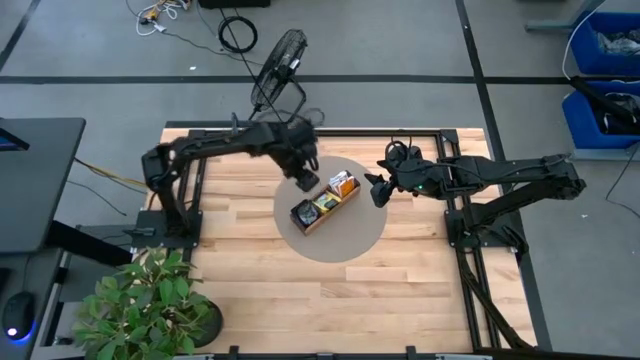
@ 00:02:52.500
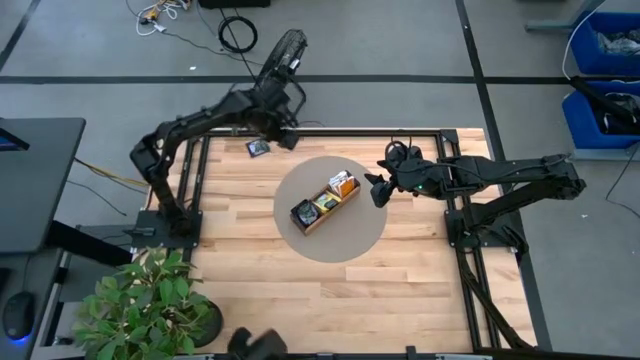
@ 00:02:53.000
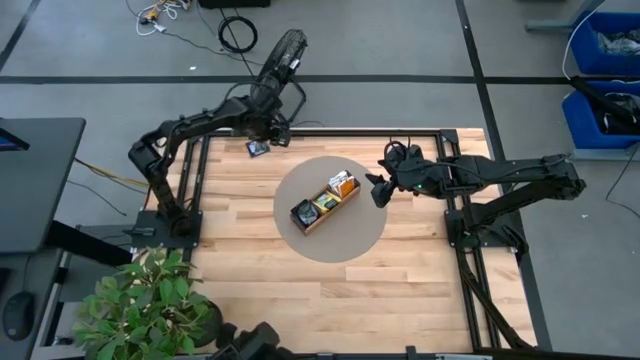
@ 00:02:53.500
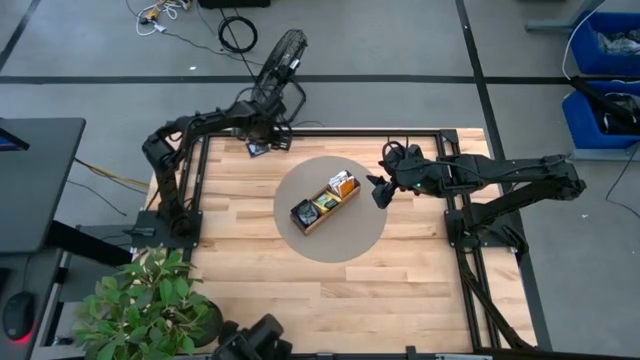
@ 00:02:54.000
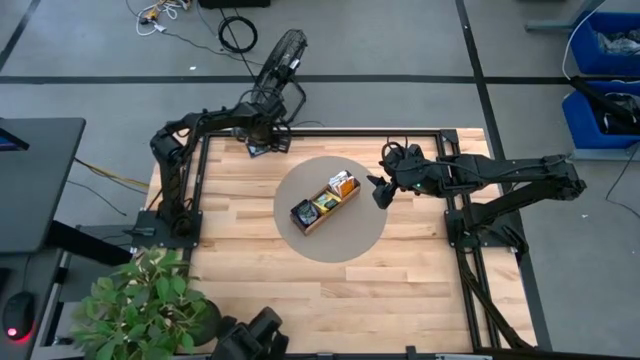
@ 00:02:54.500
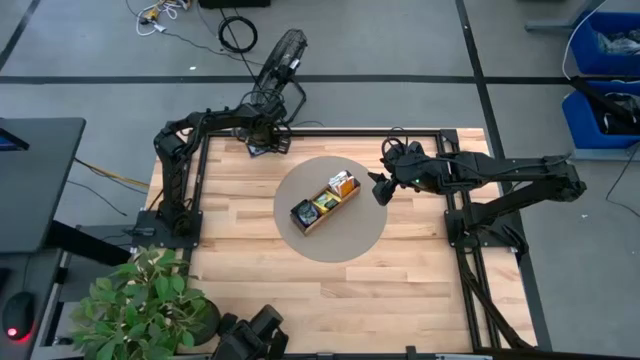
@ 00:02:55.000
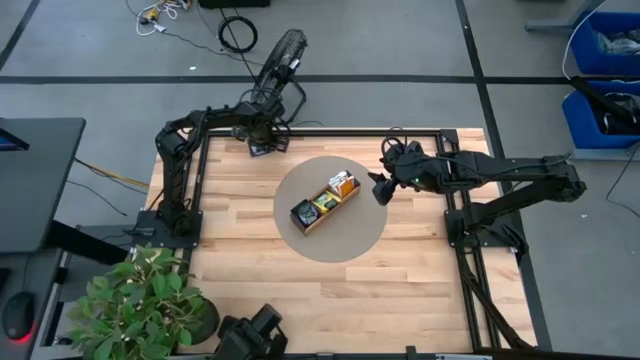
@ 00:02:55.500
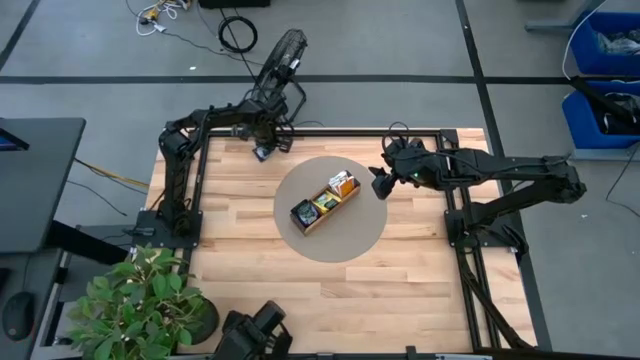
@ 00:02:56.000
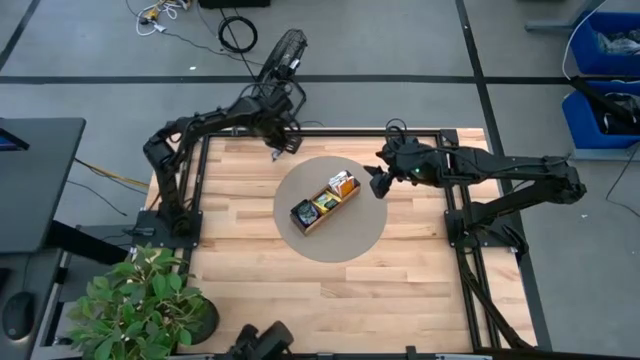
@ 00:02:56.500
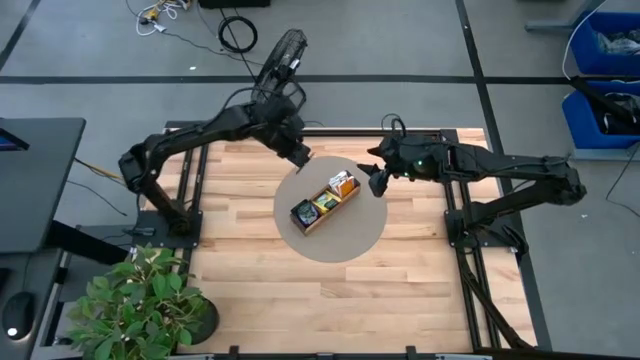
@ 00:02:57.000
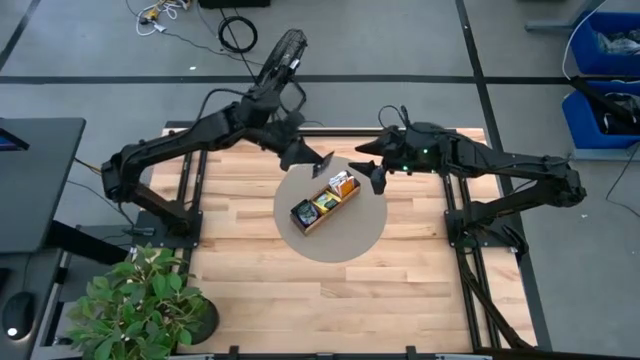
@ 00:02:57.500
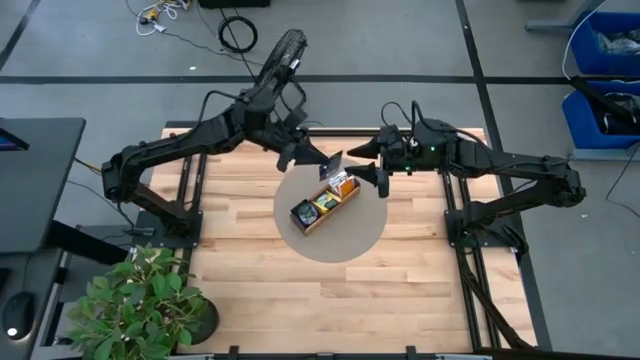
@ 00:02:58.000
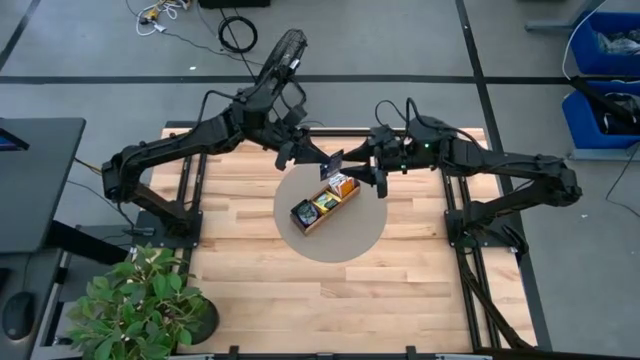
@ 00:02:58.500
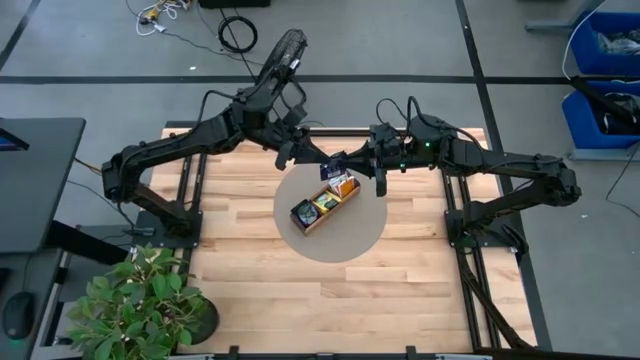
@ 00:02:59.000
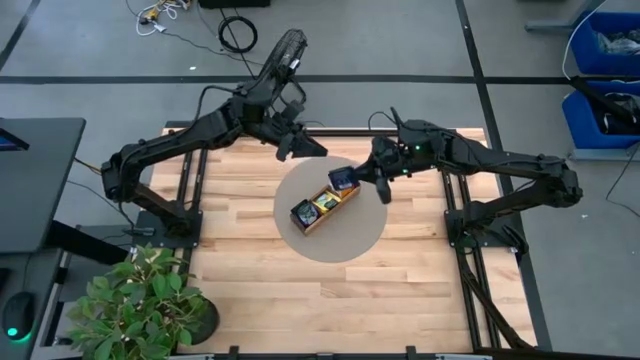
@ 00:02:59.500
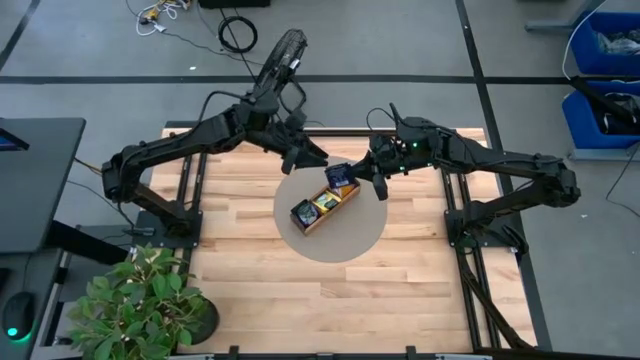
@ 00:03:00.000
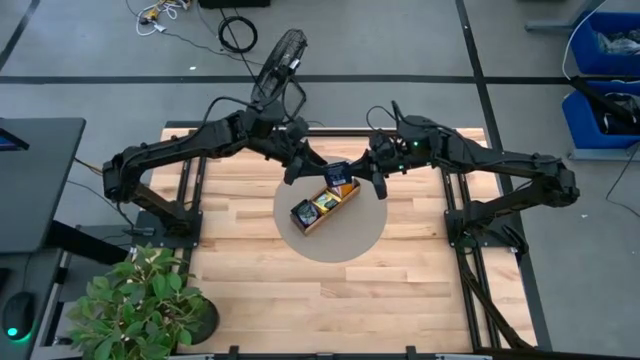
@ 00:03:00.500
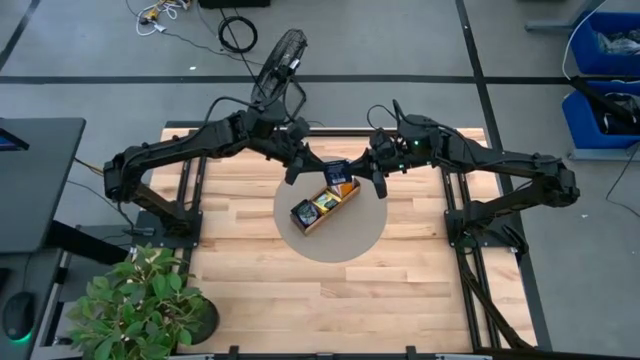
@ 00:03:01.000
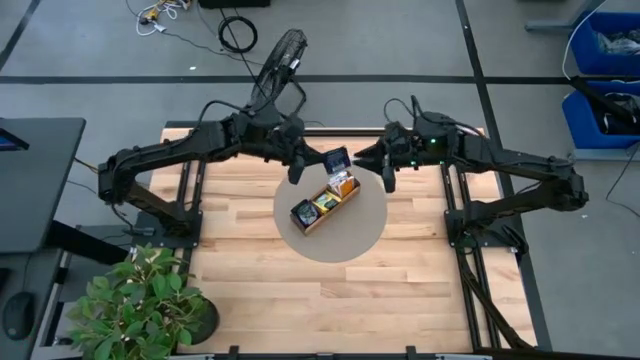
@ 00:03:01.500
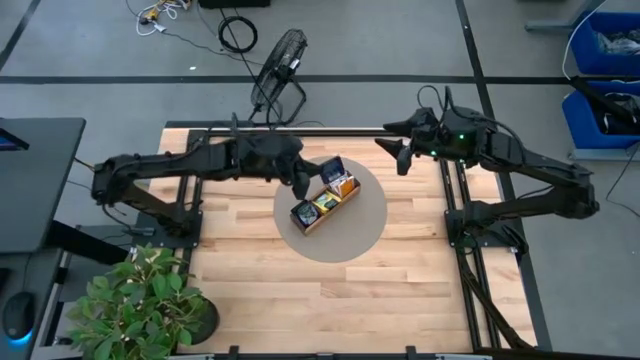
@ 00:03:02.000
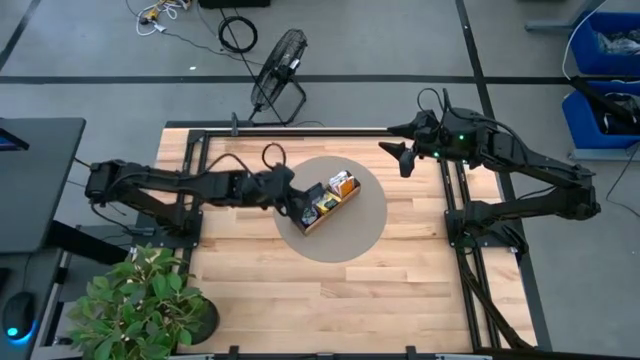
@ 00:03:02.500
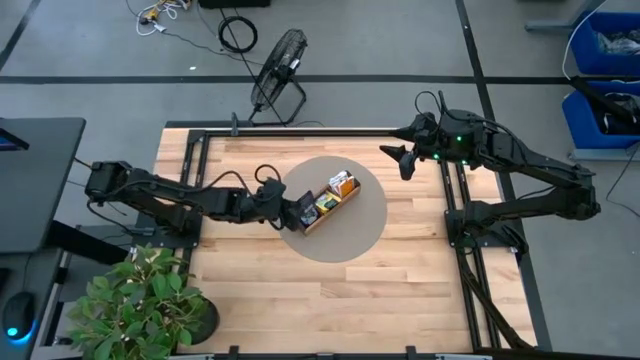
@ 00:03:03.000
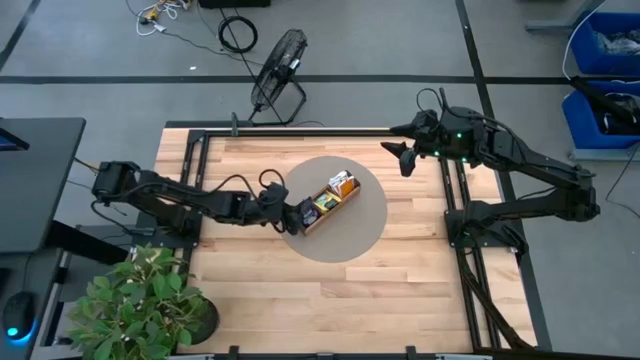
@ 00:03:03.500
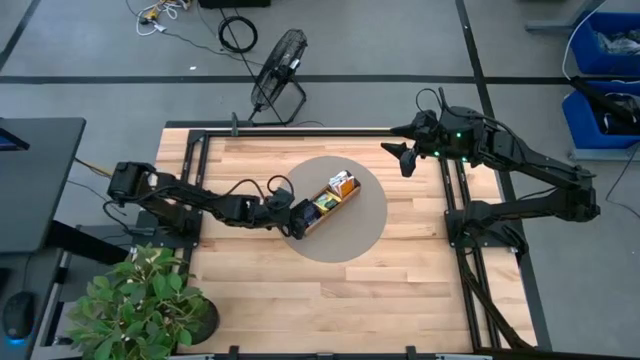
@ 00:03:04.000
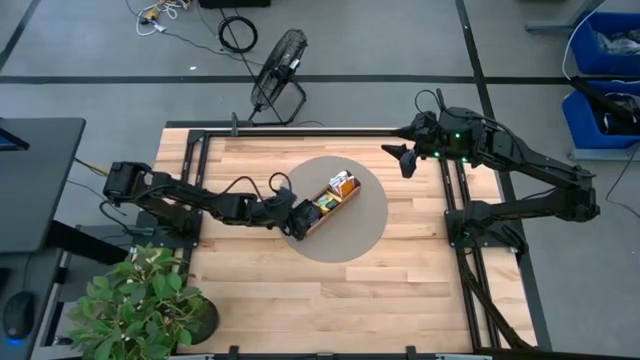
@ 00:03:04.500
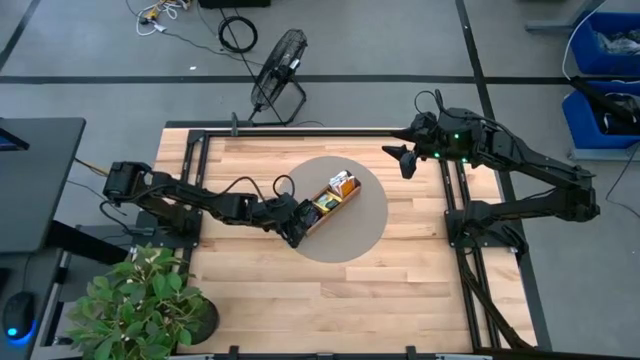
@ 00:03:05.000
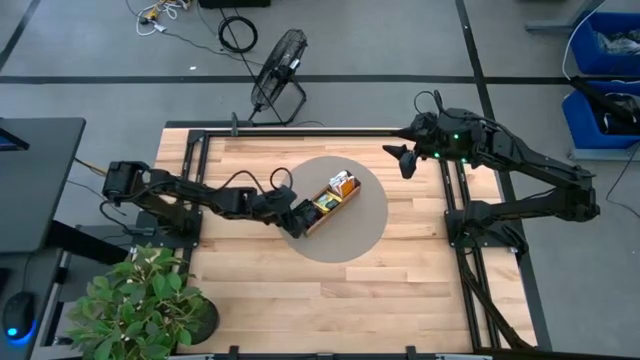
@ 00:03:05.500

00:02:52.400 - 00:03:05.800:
Task: Pick & Place Tea
Put the black tea bag into the left section of the wooden organizer

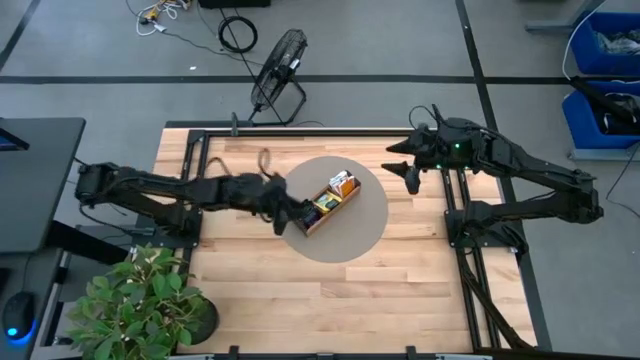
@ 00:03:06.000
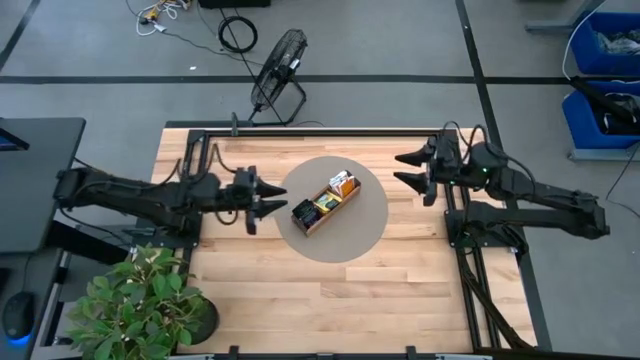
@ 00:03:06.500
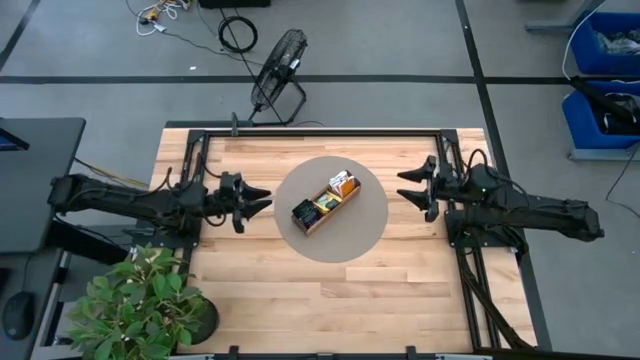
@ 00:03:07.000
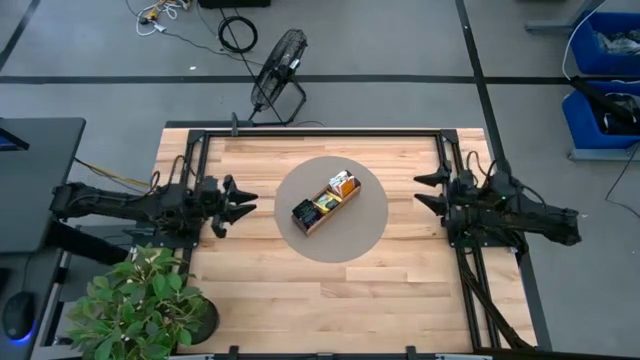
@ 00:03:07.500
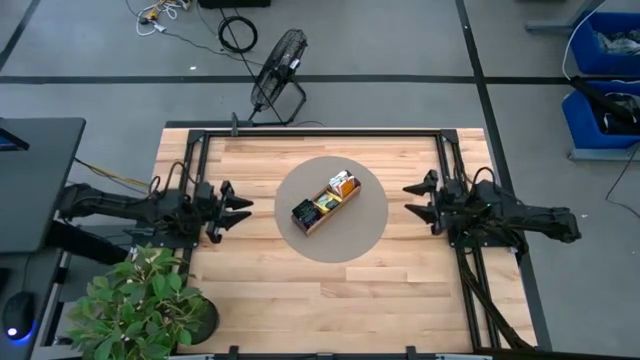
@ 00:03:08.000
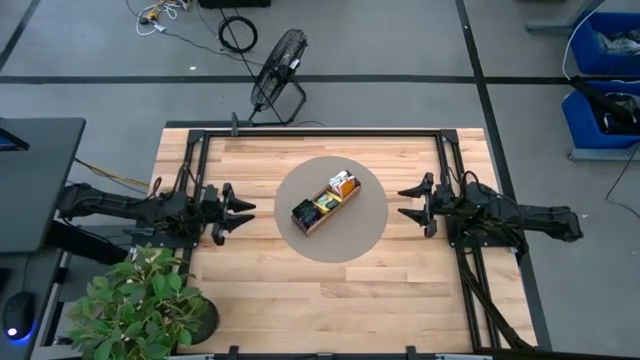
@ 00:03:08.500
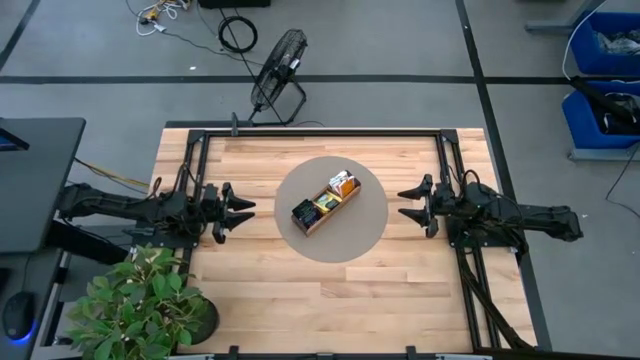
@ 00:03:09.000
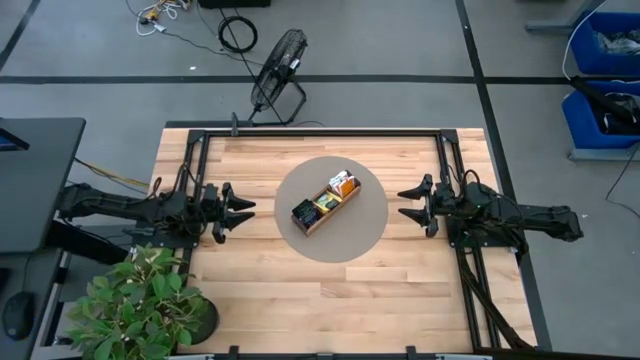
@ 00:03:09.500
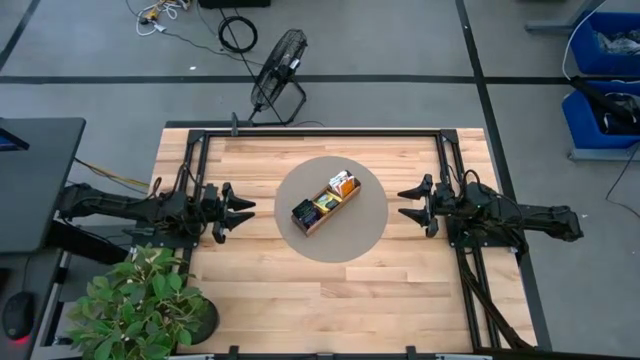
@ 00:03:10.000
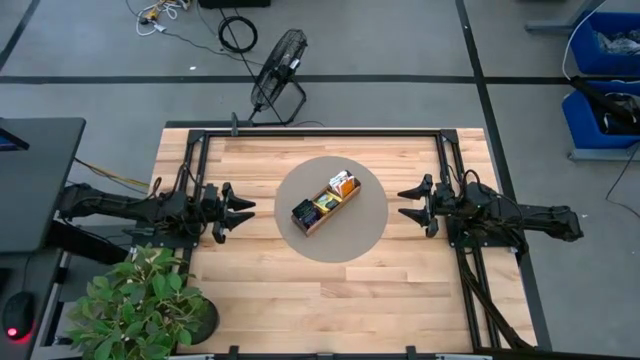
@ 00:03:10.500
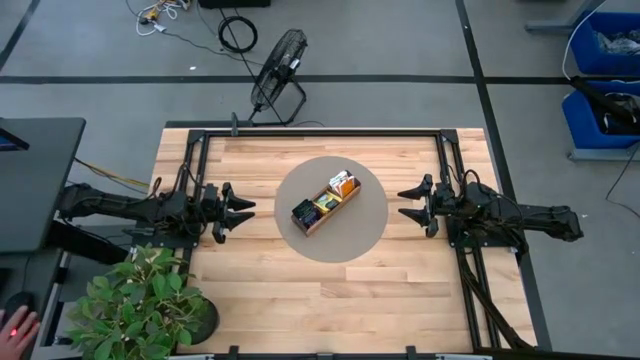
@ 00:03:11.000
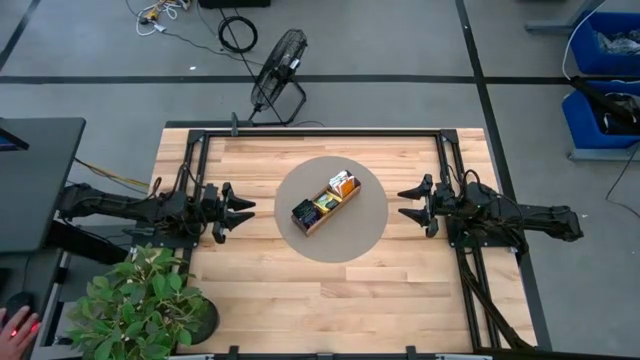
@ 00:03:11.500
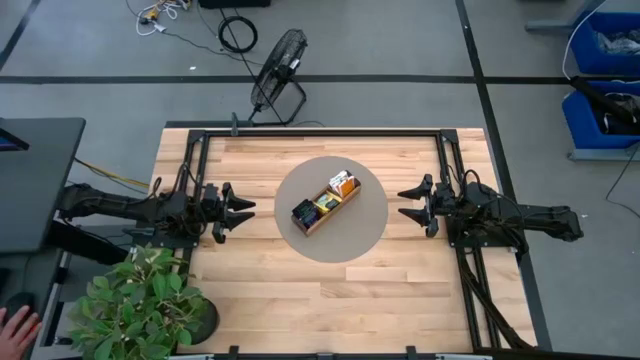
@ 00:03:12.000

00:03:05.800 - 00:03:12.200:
Return to Home Position
